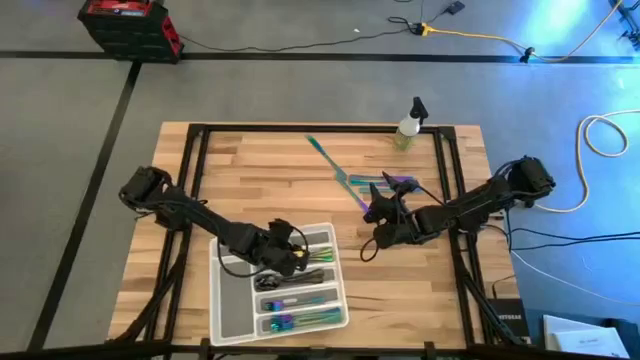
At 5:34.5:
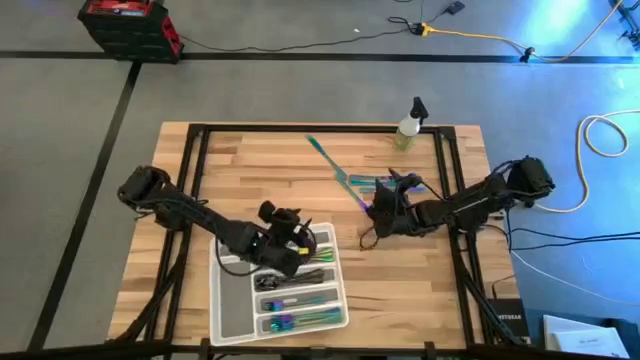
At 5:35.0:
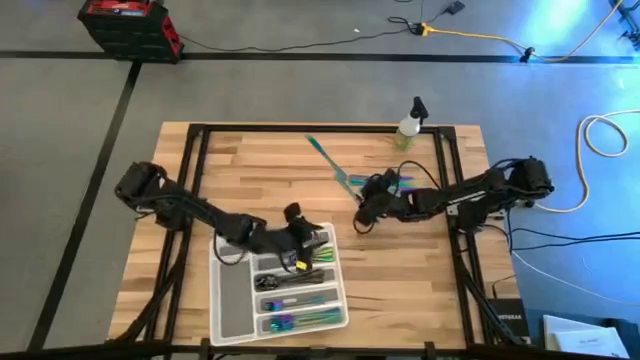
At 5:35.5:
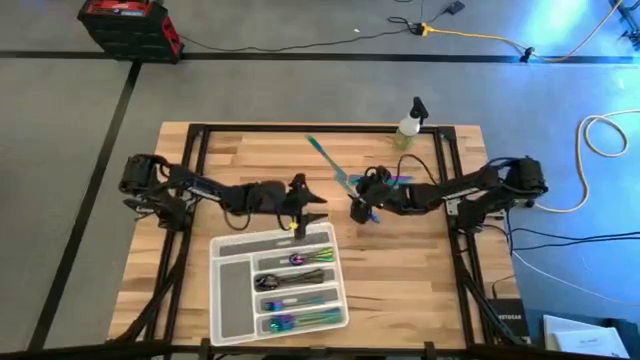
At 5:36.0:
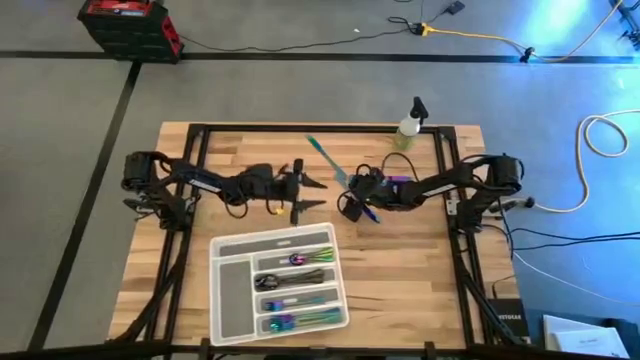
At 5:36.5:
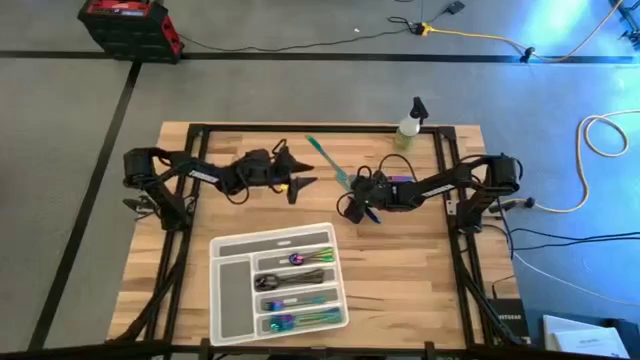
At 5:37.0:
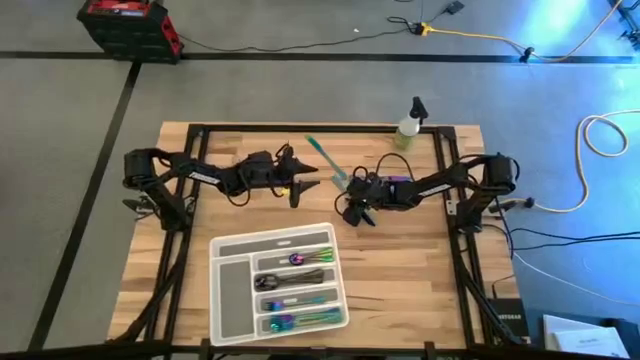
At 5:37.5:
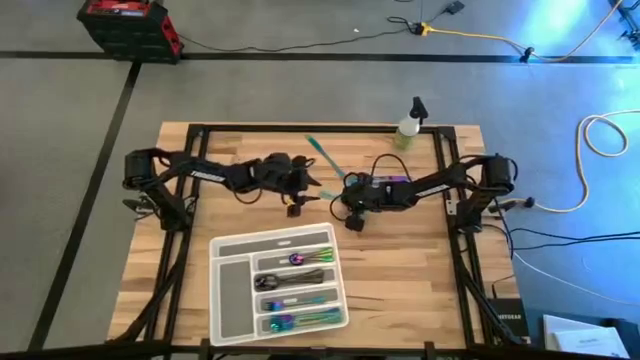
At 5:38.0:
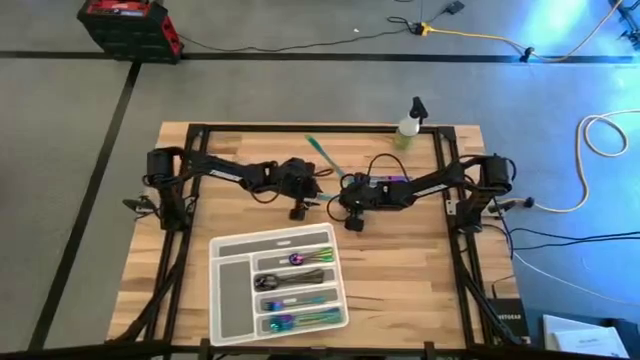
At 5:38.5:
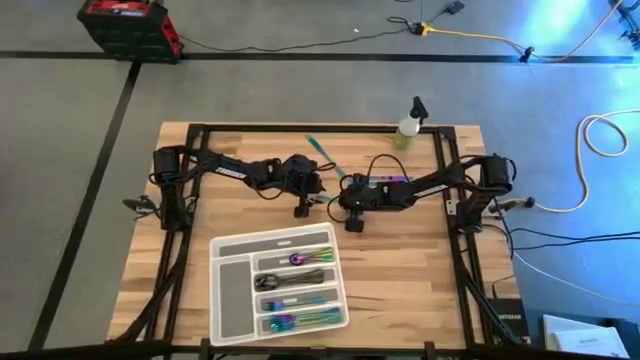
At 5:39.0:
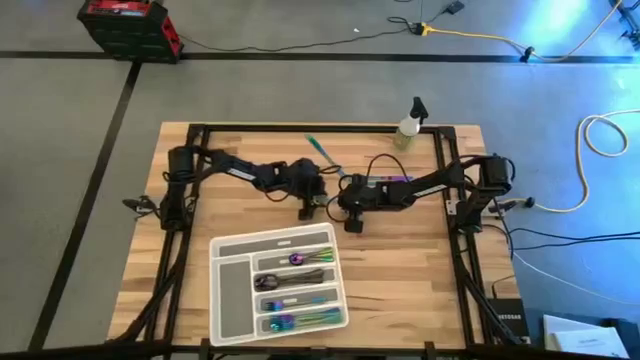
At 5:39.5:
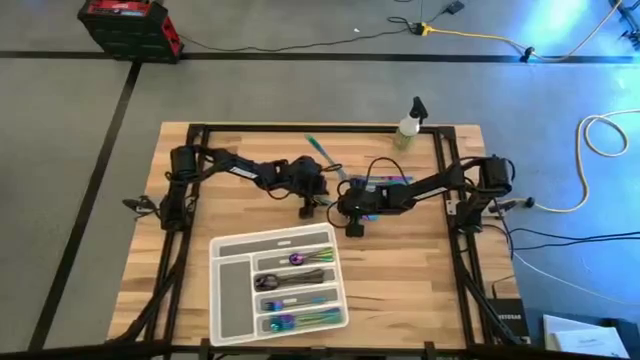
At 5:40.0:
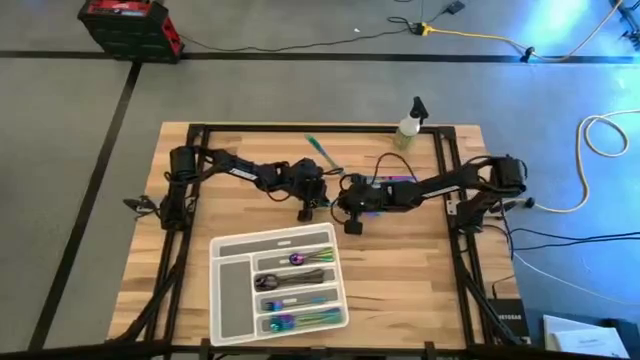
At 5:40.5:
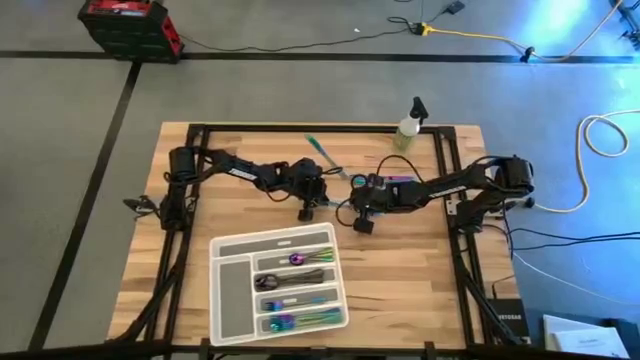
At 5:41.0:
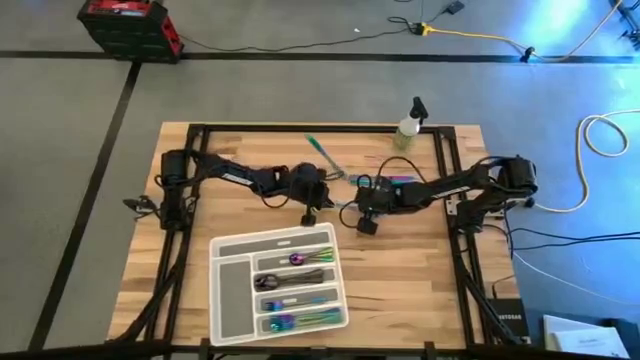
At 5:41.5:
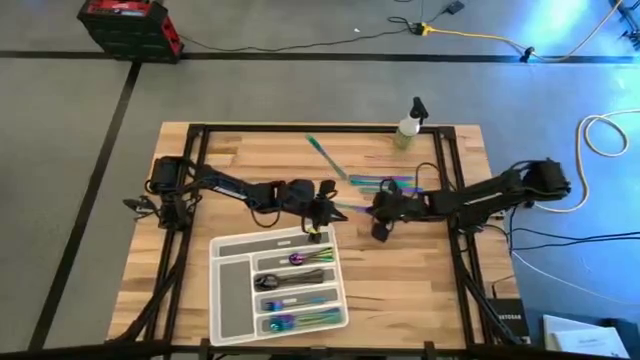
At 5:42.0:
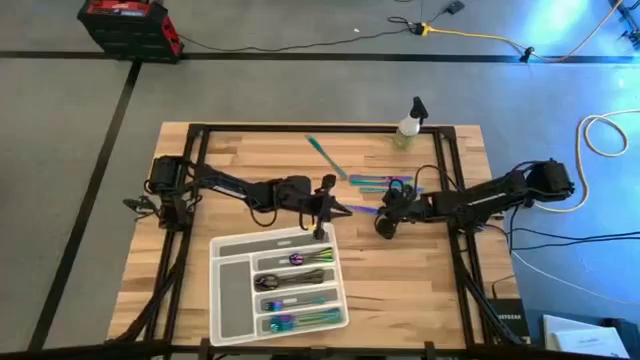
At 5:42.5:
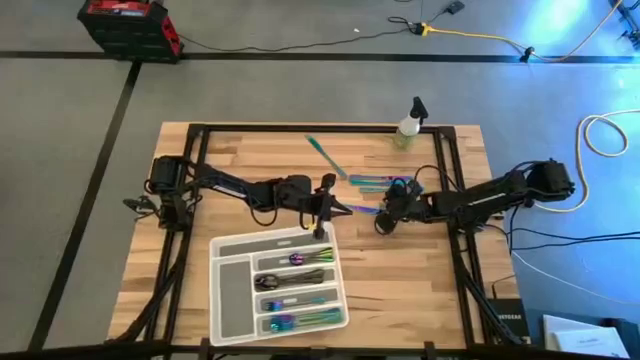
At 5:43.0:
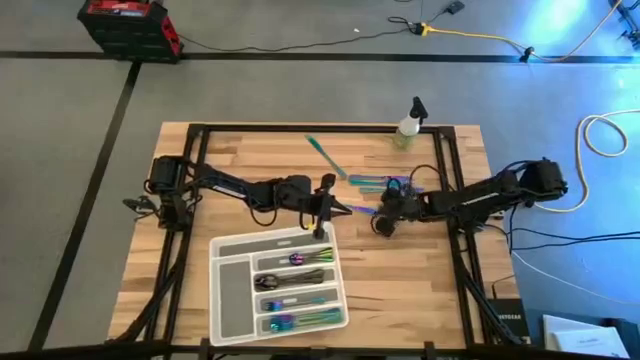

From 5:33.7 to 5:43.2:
Task: Sort silverware
Put the blue table knife into the white silverware tray

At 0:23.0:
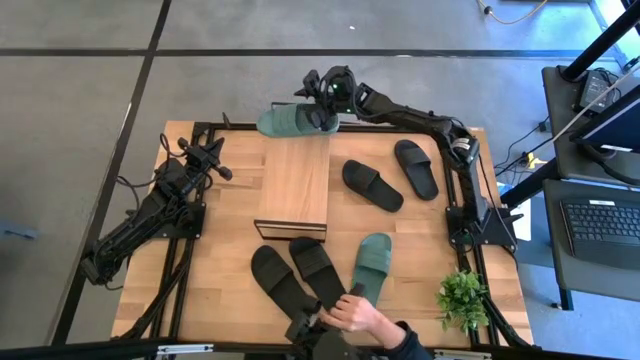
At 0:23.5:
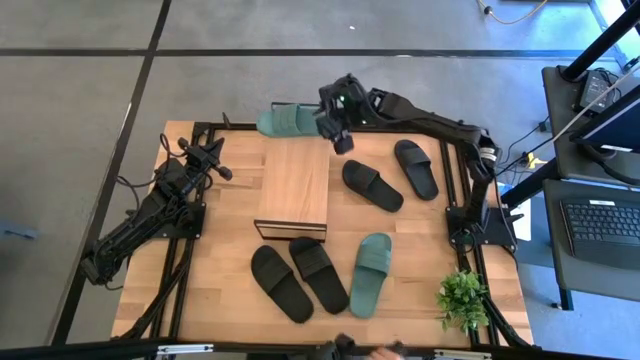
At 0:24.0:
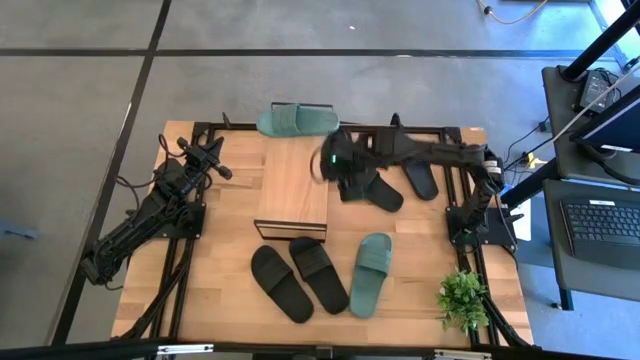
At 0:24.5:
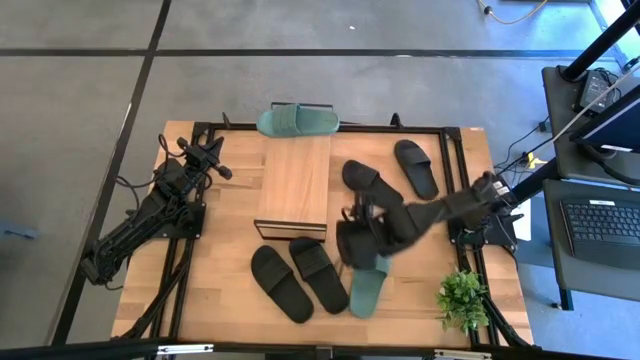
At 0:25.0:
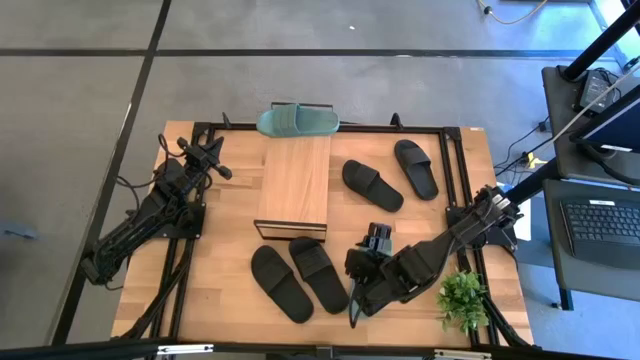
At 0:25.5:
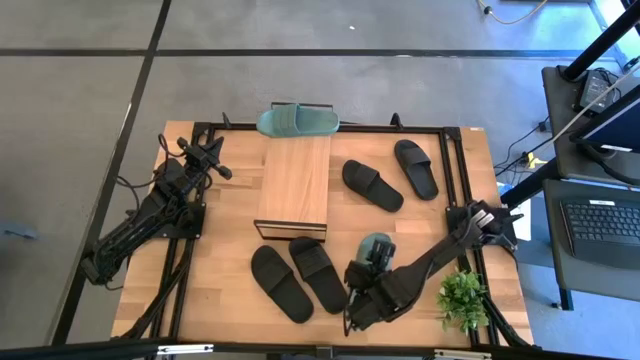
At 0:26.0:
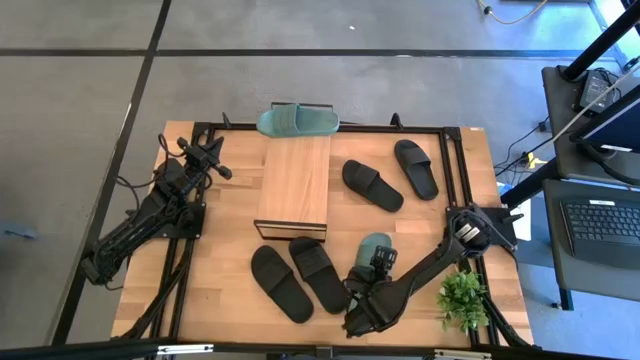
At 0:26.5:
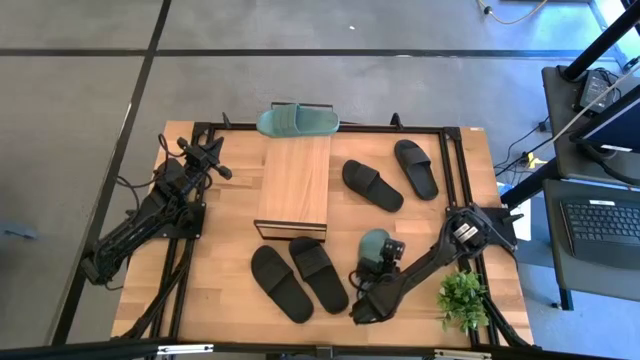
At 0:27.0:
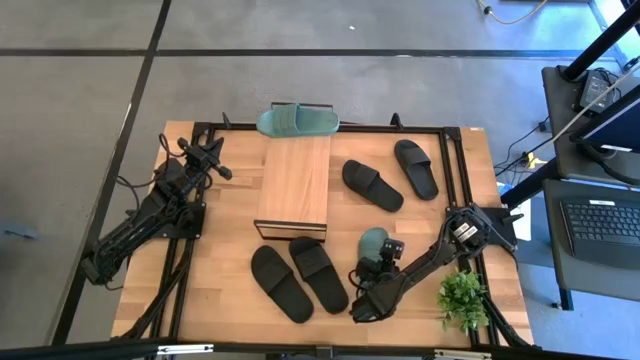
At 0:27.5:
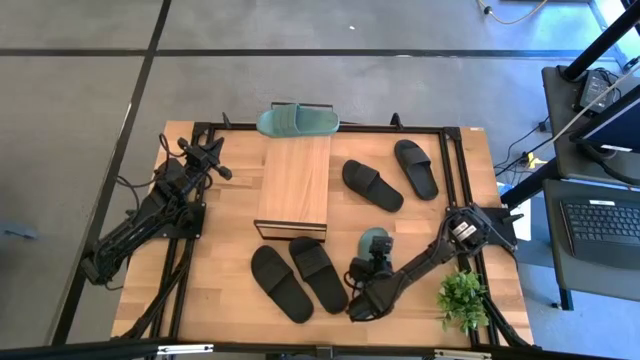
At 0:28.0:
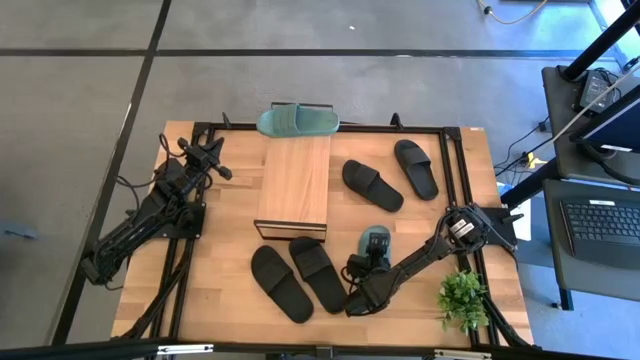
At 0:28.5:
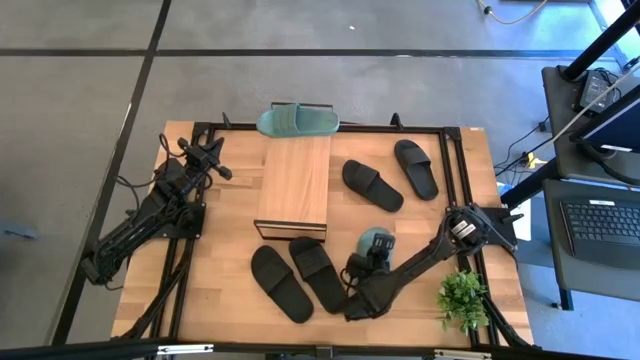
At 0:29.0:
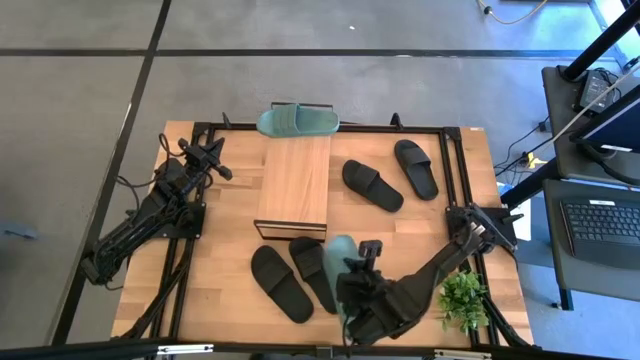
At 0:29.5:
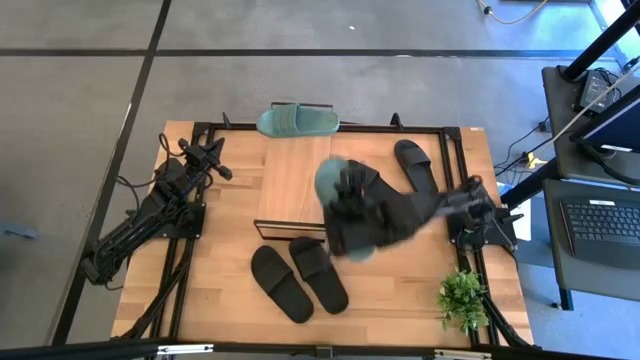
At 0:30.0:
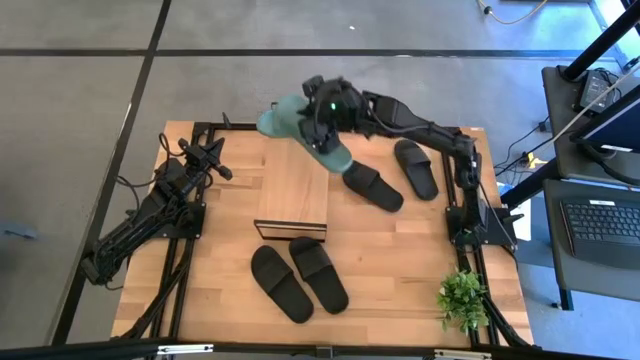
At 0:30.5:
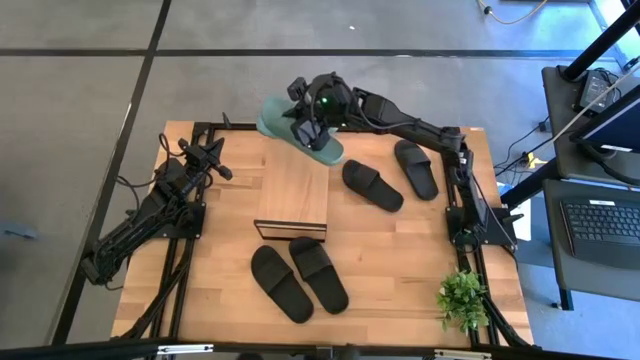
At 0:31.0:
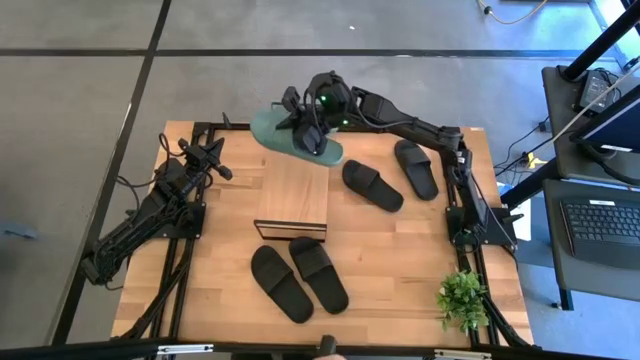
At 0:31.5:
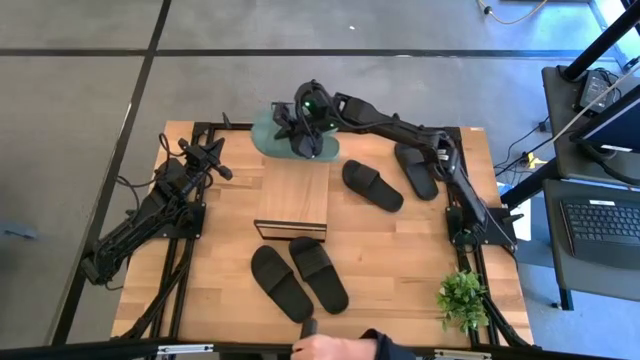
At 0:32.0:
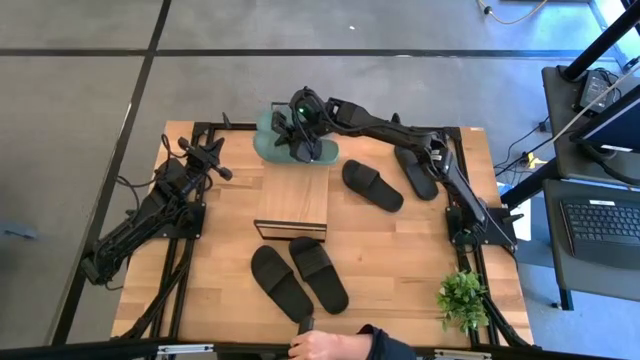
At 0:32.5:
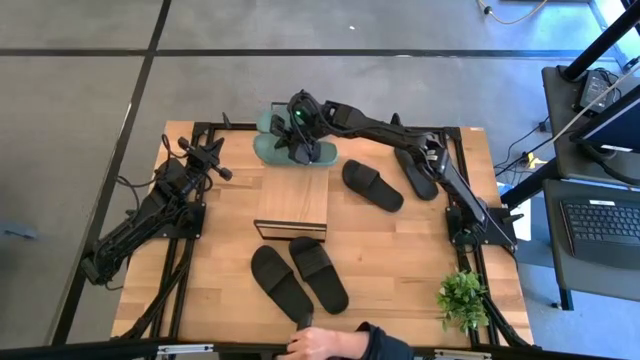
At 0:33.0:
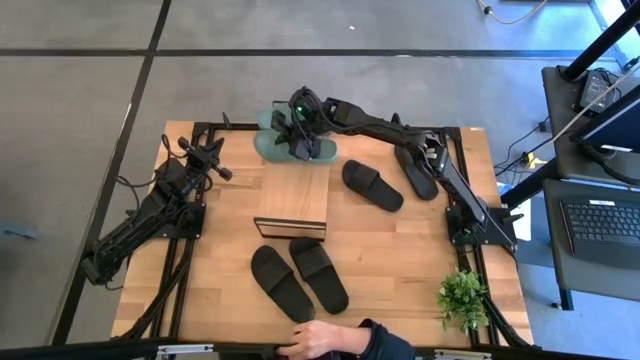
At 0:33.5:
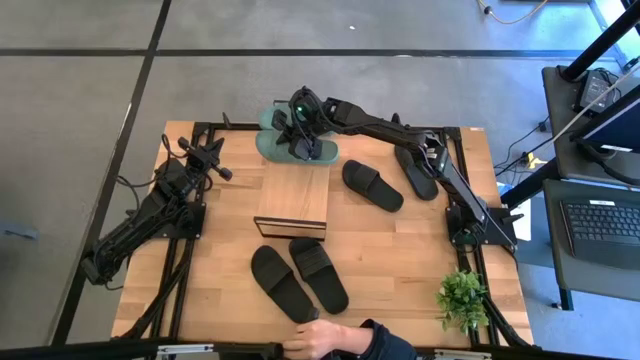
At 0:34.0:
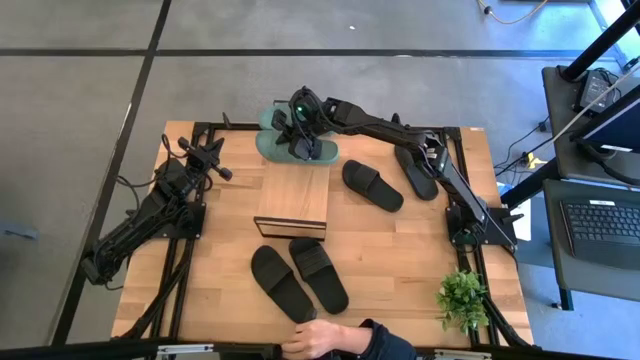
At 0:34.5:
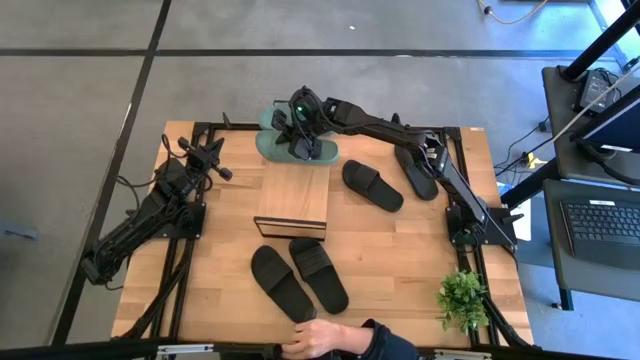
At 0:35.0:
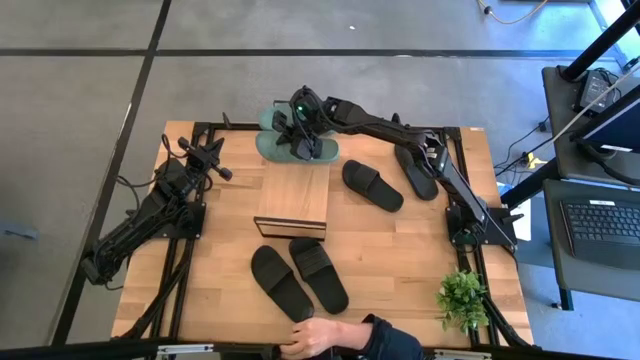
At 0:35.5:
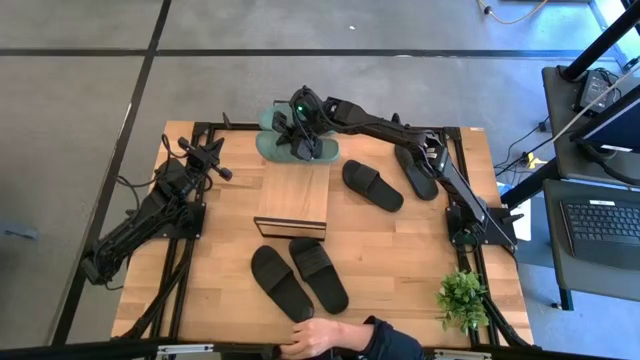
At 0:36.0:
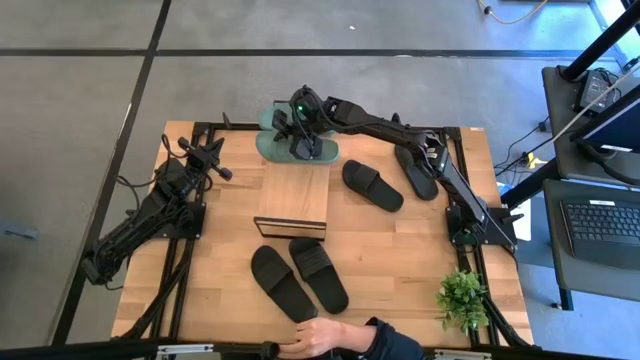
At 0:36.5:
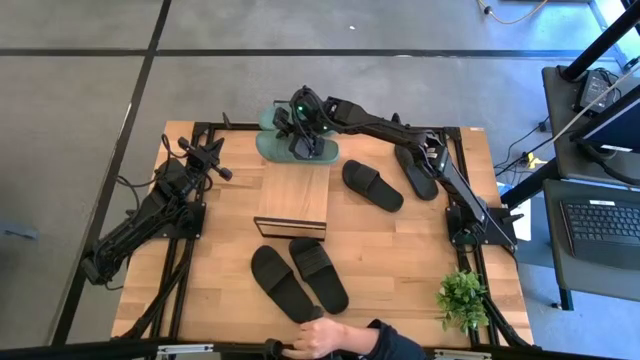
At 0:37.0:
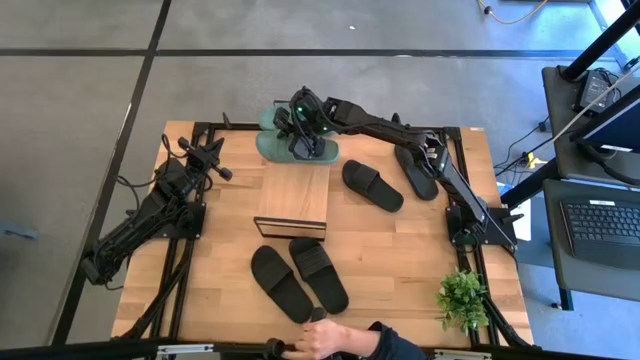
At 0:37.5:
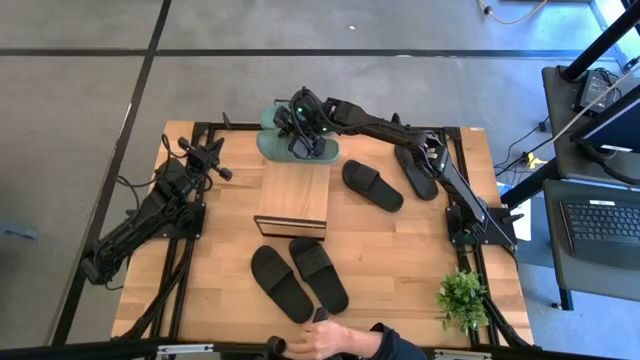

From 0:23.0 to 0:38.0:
Task: Pick and place slides into the shelf
Put the green slide on the shelf
